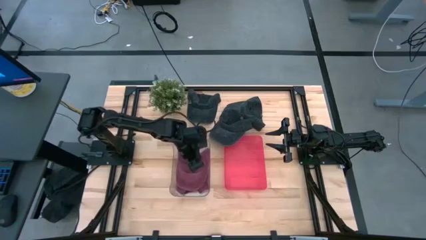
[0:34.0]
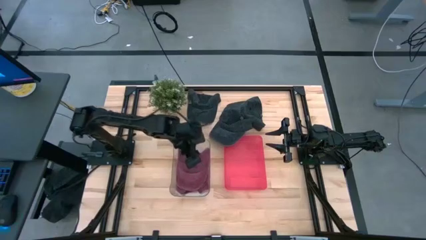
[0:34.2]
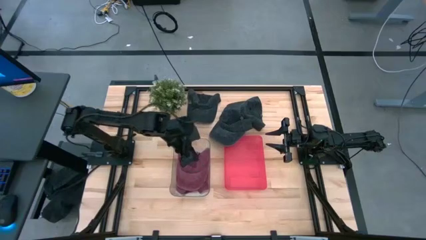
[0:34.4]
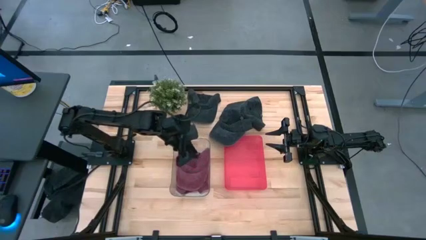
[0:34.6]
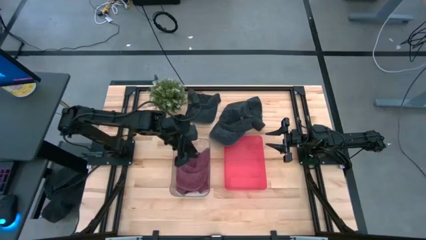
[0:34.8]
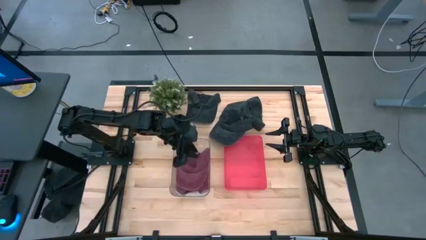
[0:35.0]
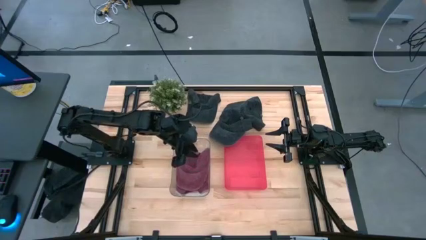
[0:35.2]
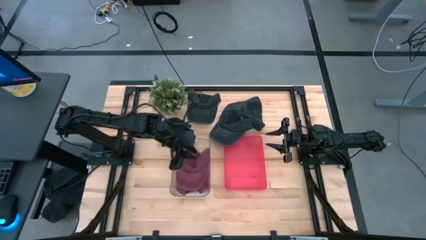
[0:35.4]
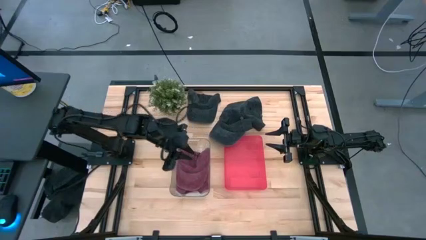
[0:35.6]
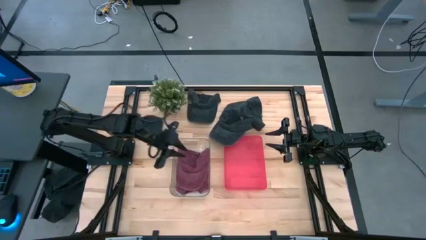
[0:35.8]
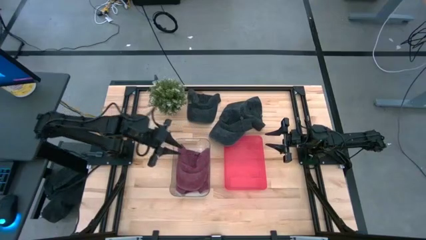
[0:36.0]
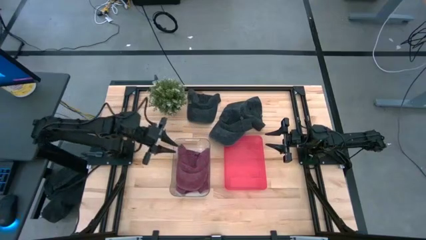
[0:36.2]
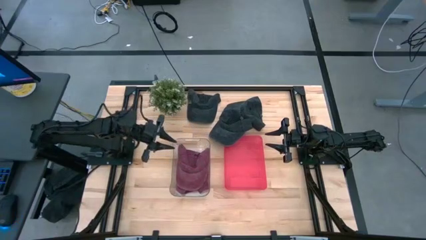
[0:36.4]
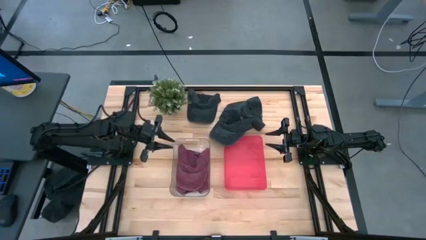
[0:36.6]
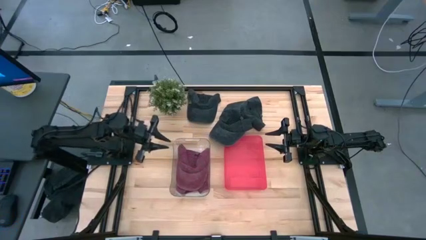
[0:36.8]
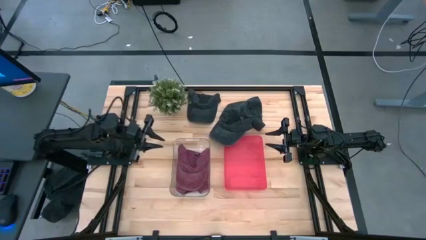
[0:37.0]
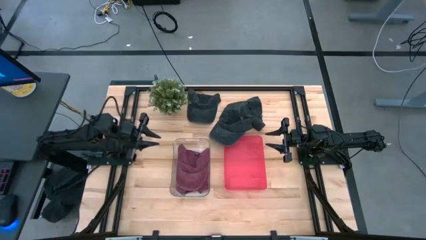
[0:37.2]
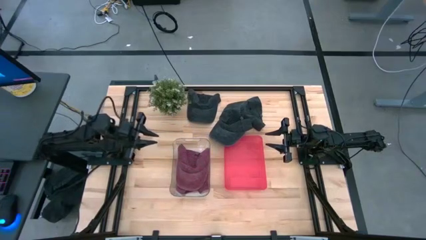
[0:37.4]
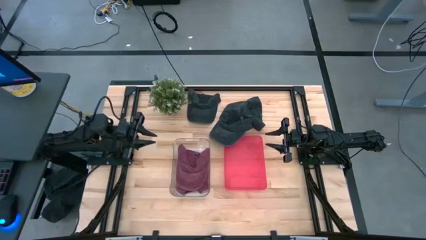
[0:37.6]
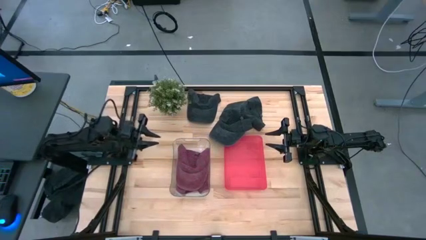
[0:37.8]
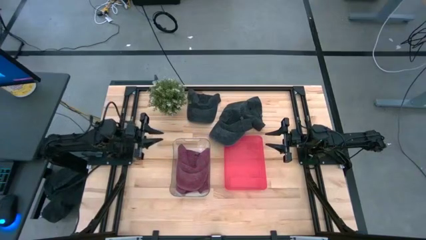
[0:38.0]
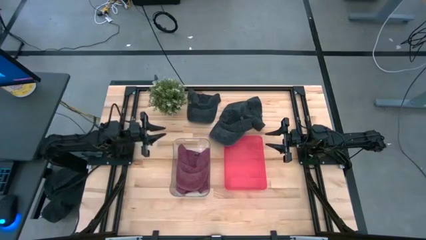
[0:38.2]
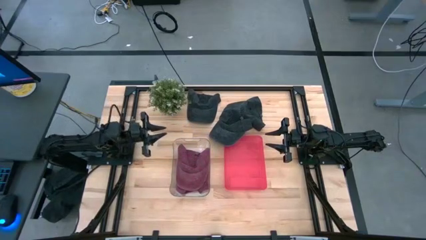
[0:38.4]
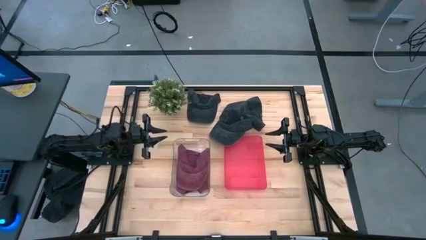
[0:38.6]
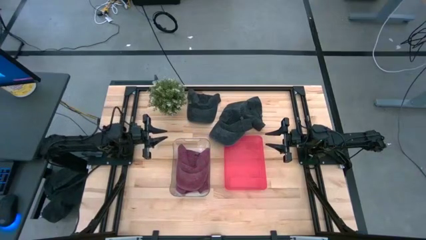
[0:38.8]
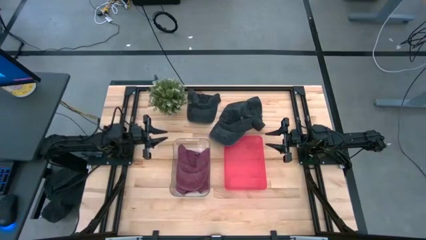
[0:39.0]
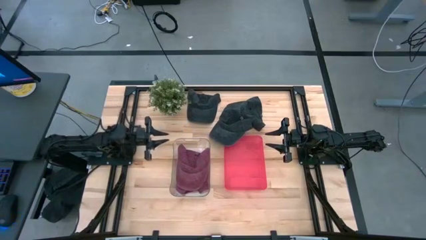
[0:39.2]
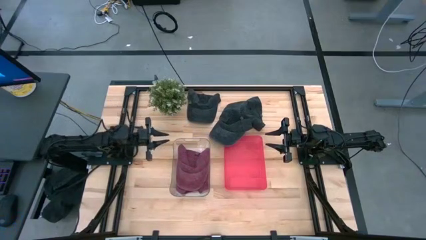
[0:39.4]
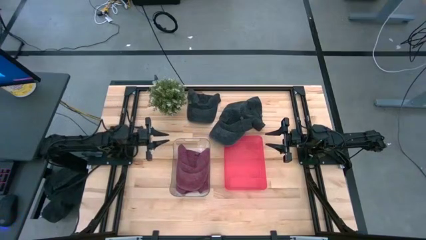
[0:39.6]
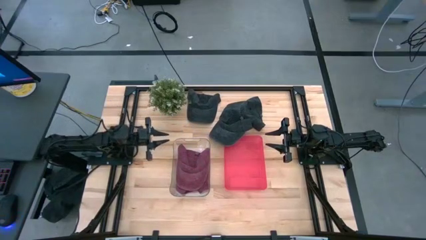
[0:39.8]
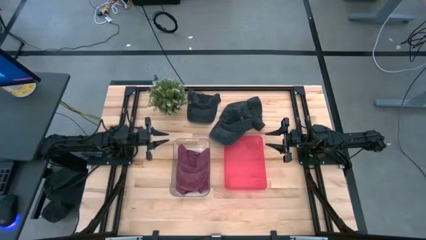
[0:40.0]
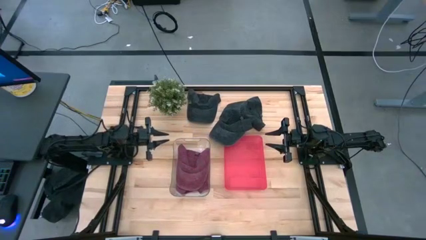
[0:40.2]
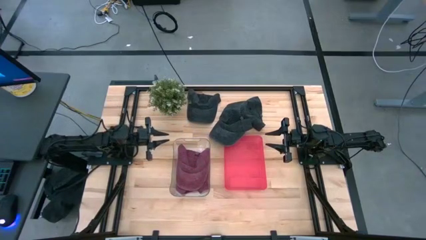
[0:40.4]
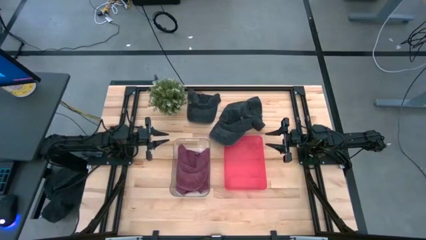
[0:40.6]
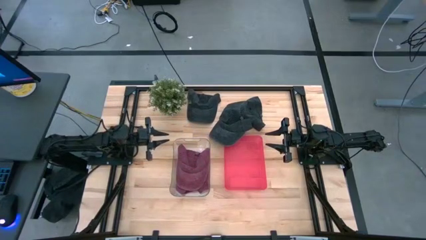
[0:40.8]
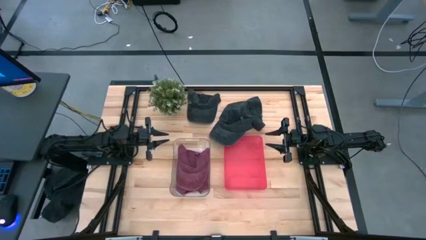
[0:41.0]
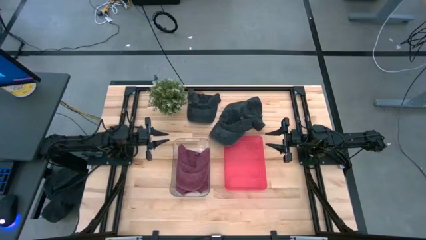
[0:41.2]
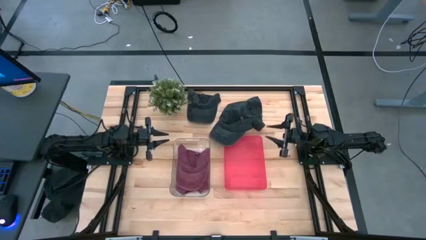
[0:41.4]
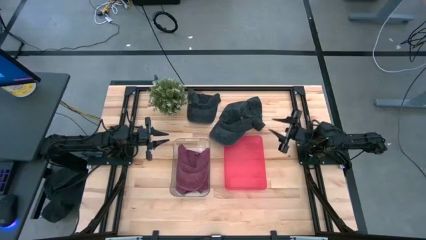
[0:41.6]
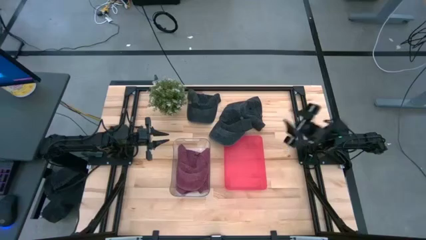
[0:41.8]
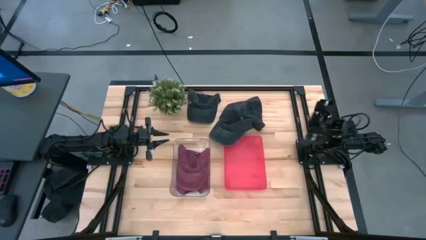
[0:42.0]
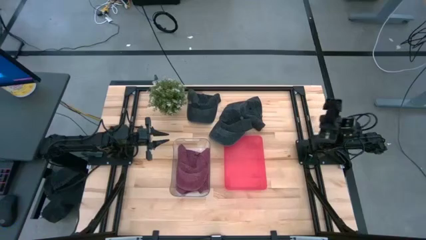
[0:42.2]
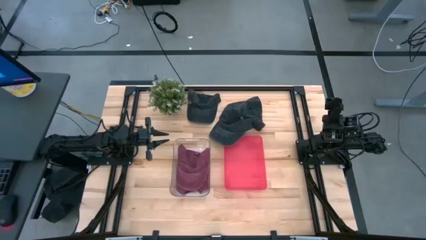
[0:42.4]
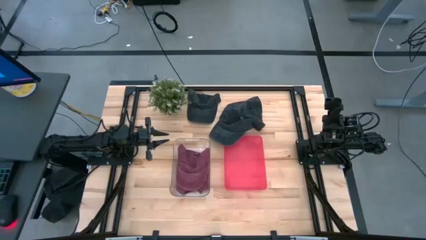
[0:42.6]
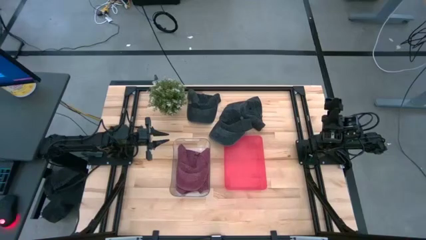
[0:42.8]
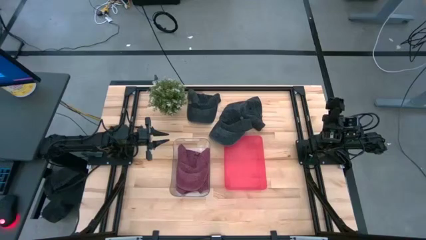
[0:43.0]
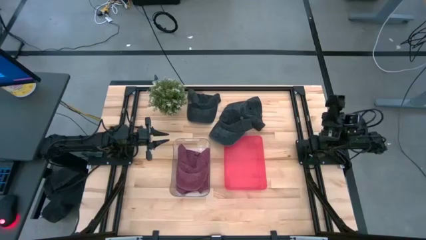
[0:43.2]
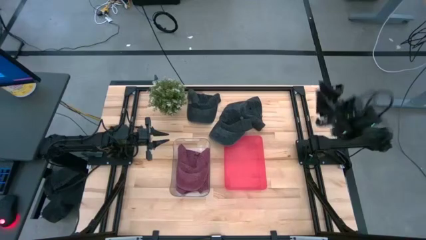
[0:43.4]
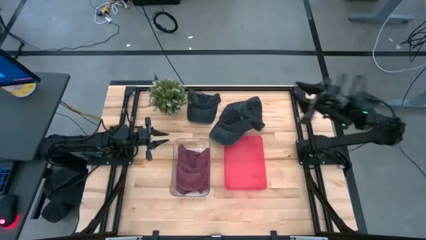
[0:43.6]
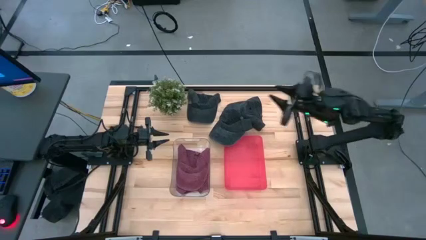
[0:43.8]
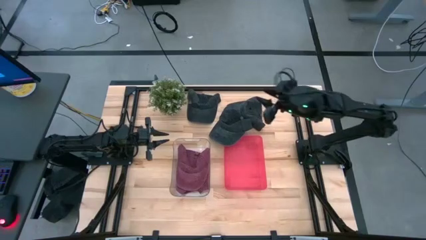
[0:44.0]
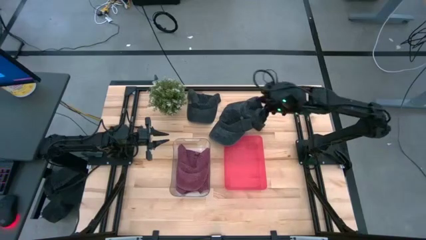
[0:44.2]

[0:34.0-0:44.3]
Task: Pick & Place hat
Put the black cap into the red bin
